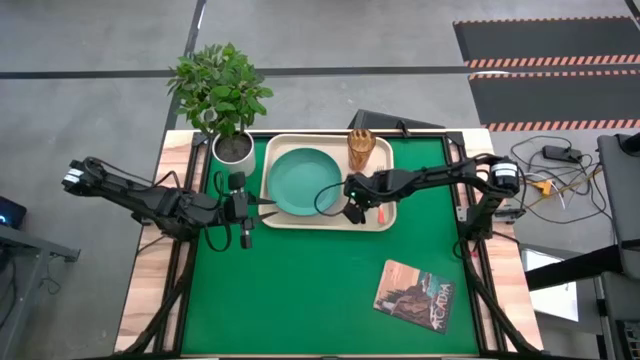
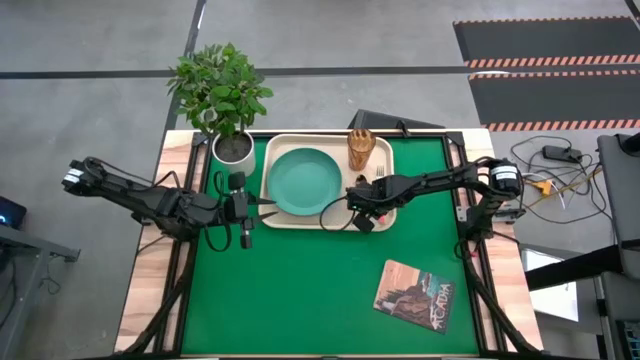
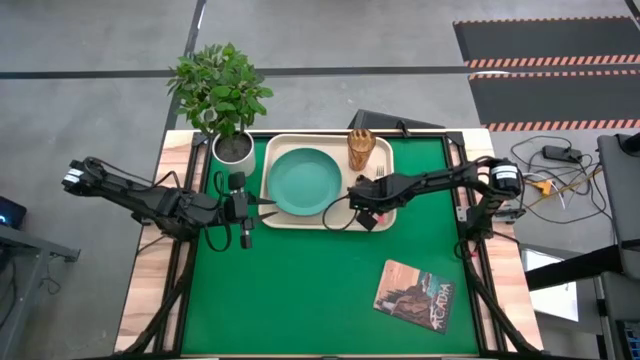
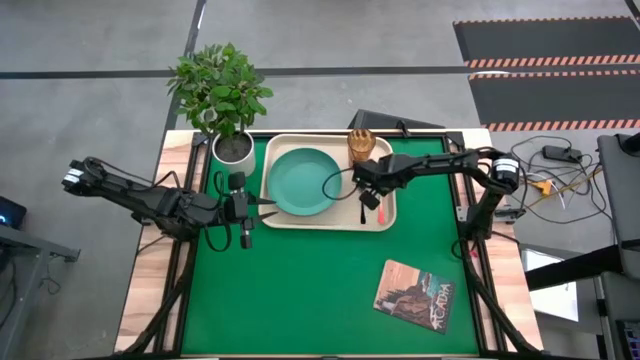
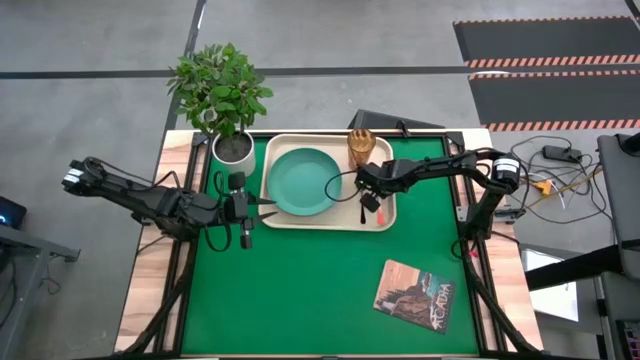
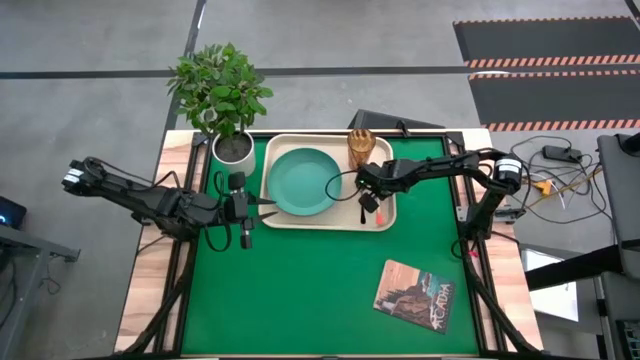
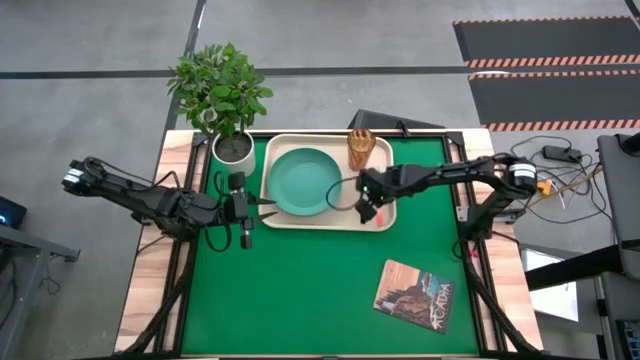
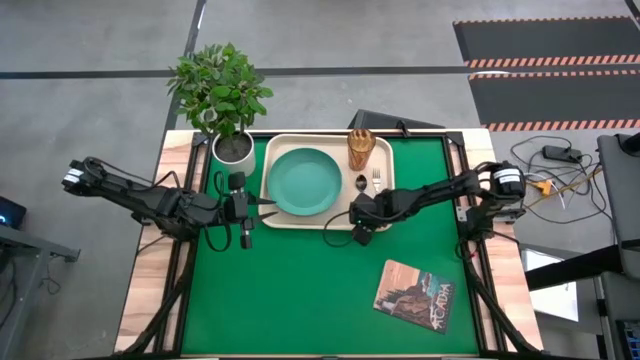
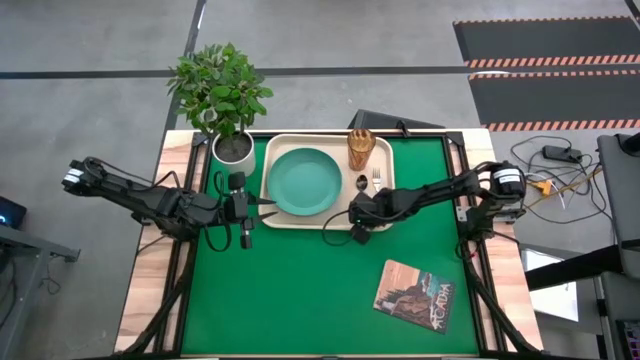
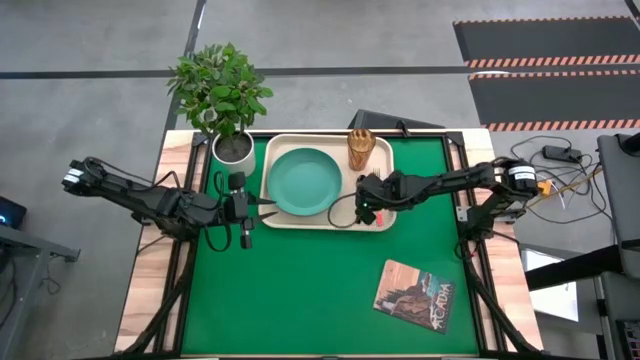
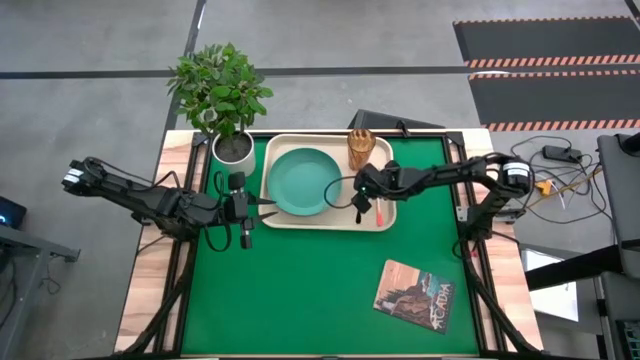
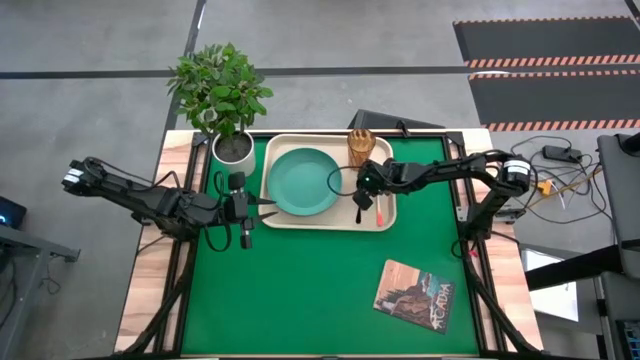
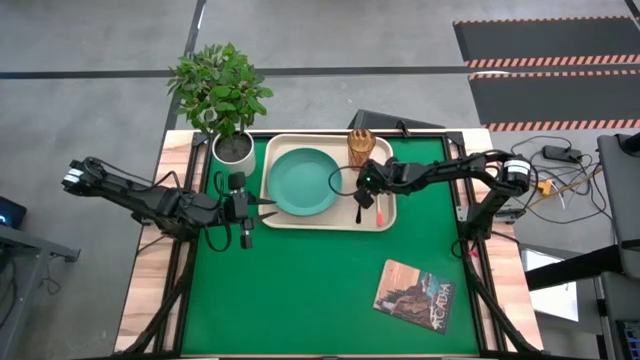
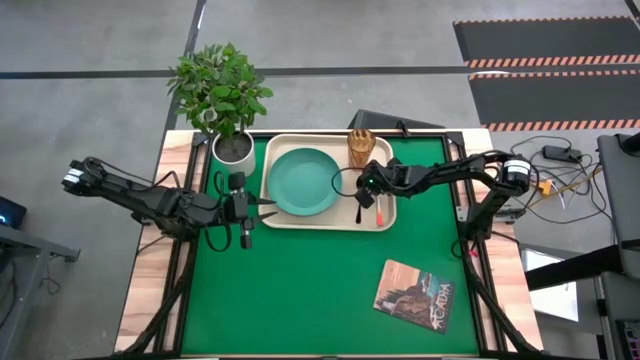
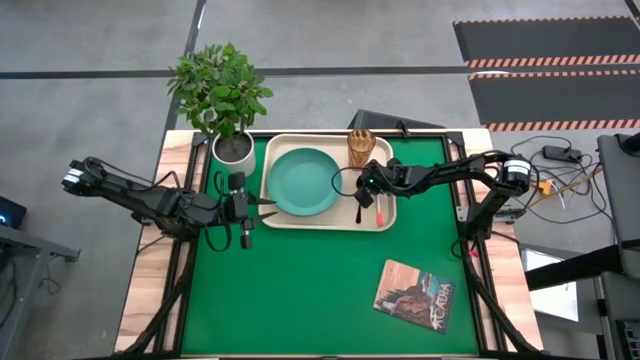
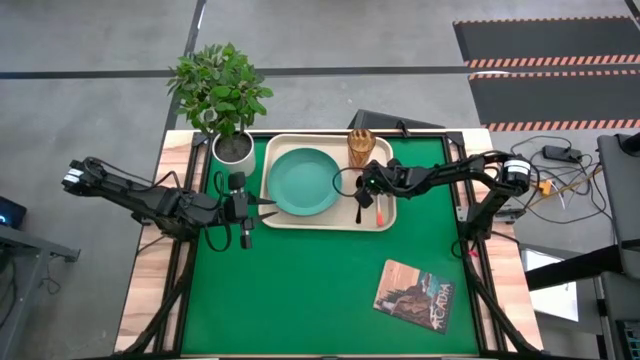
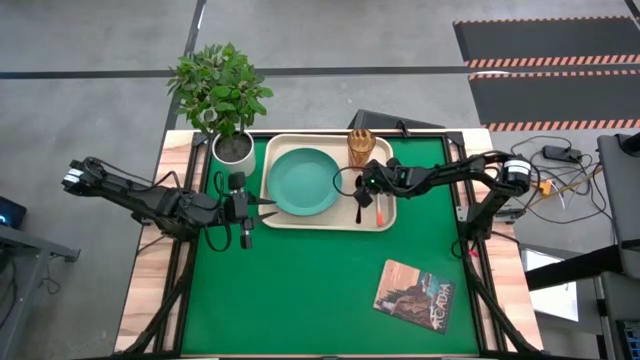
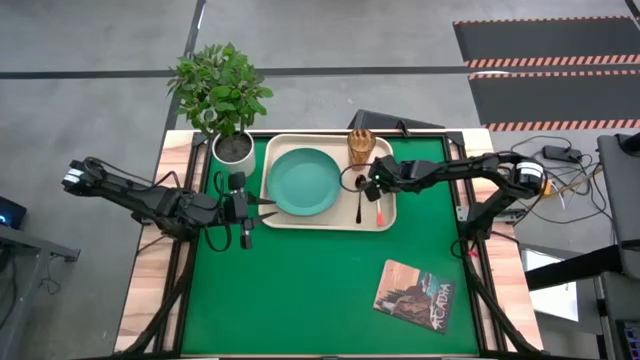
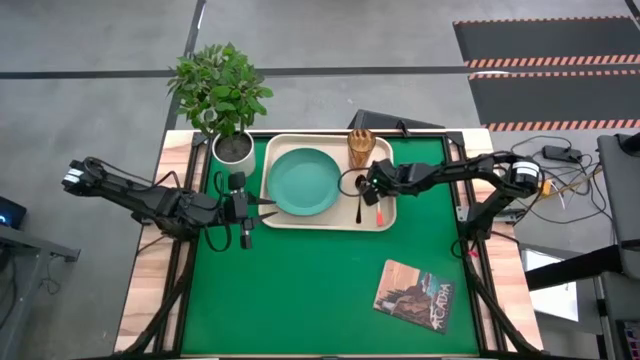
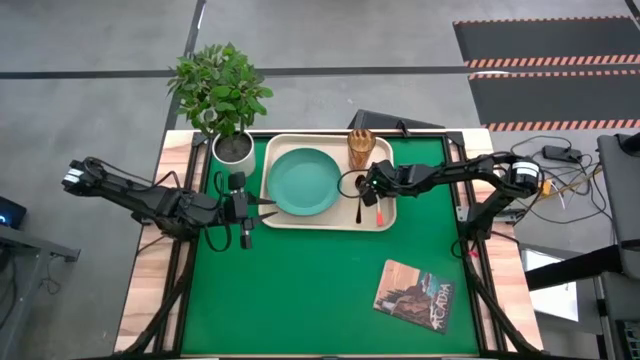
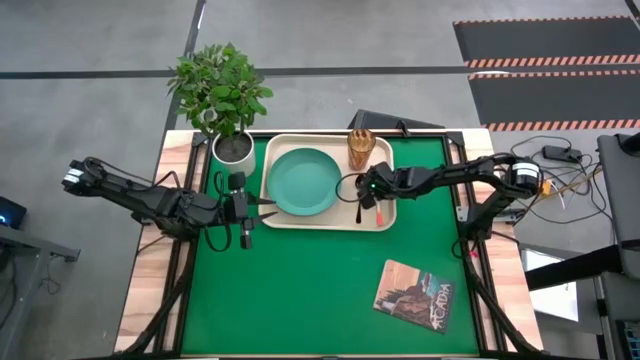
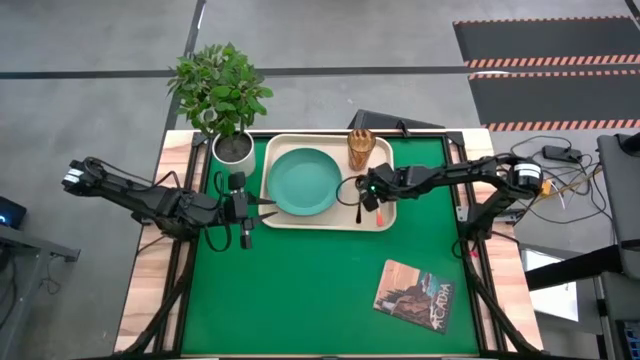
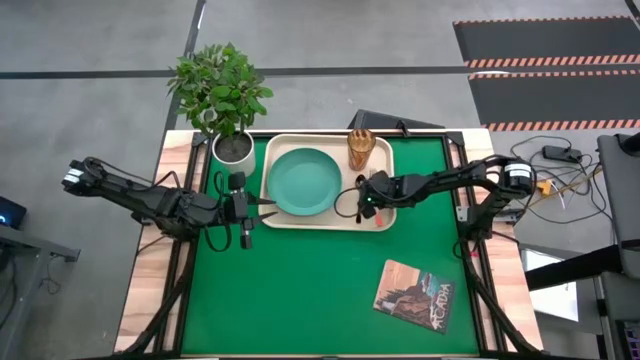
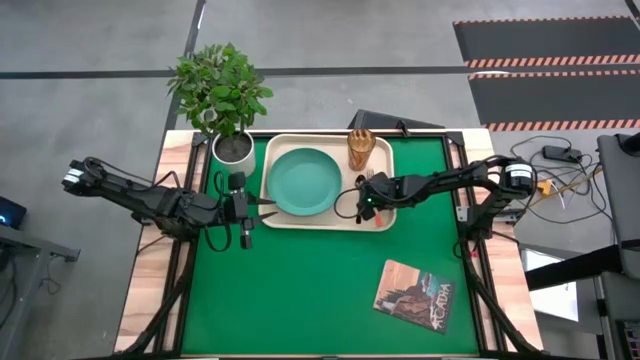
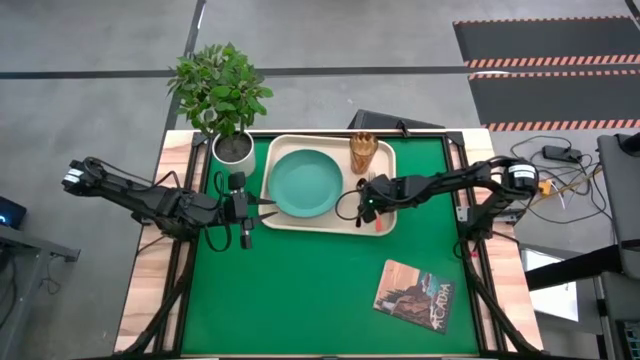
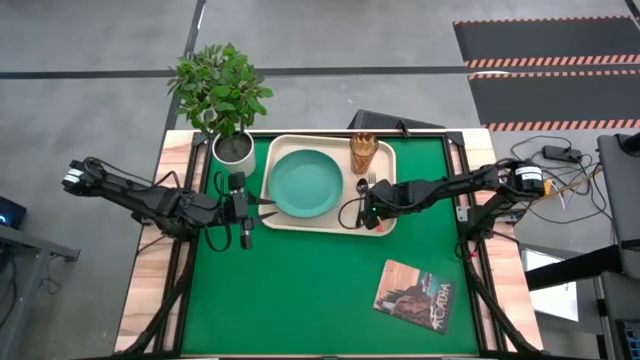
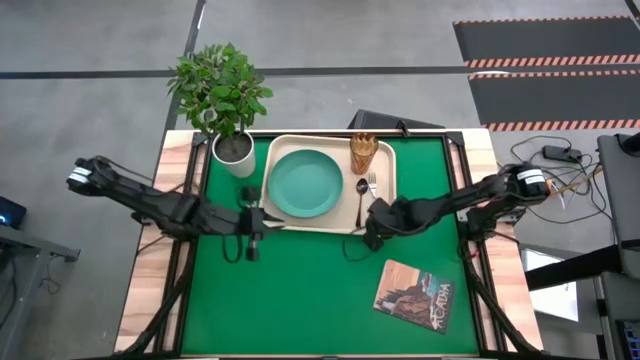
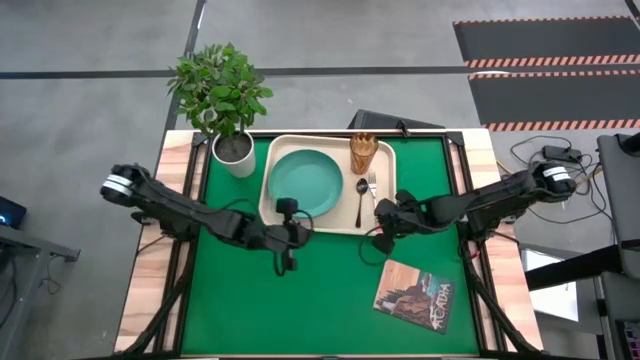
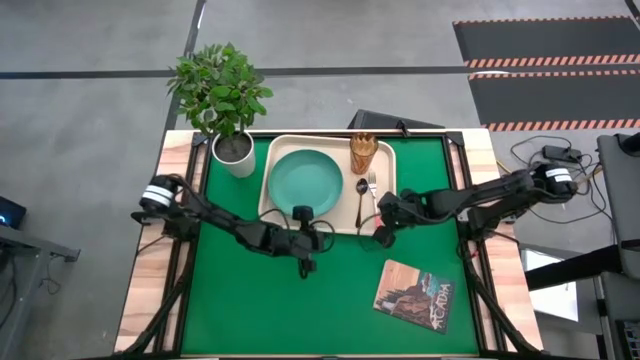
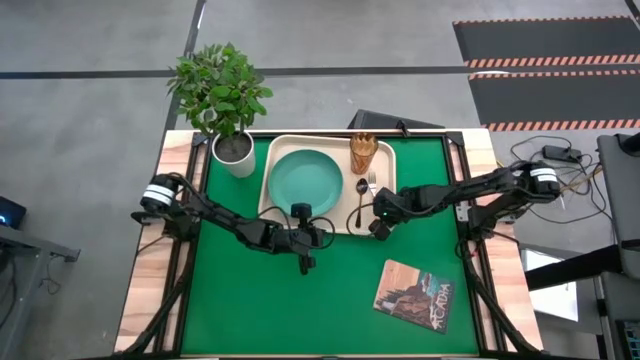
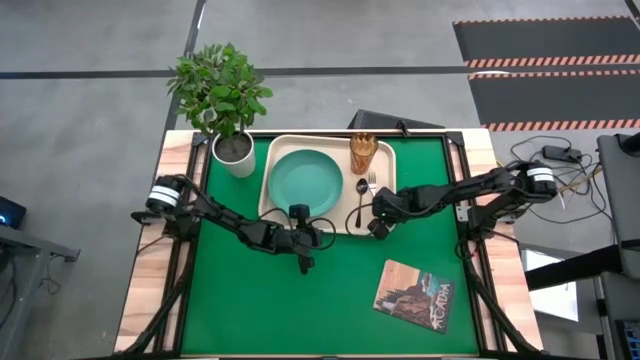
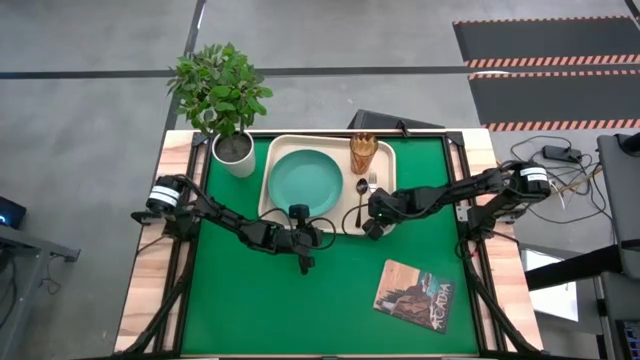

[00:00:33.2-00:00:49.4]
Task: Pick and place plate/cup/fork/spoon on tray
Adjust the spoon and the fork on the white tray

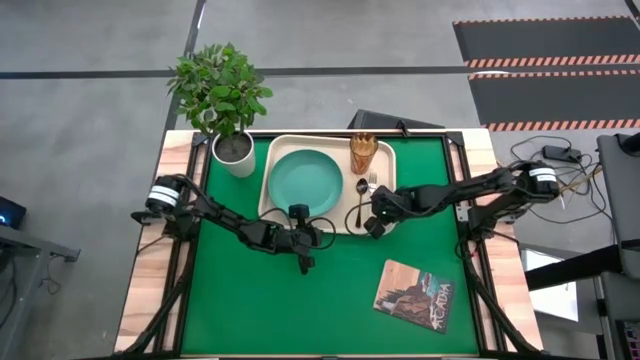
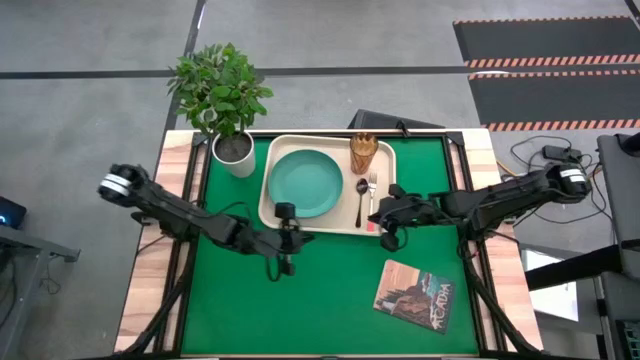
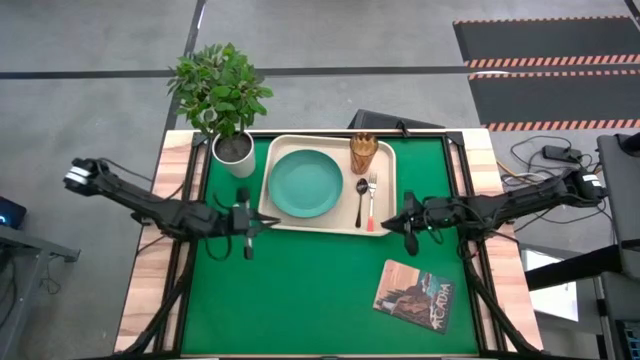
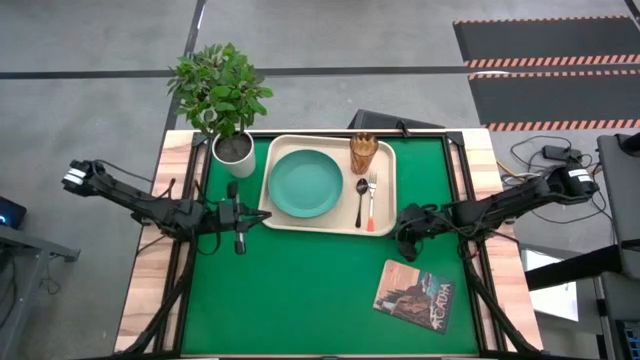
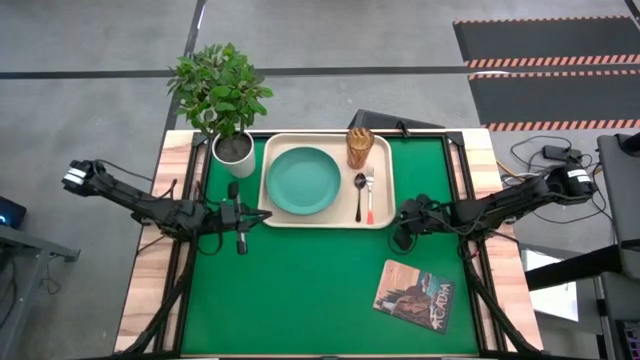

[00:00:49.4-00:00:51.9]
Adjust the white tray

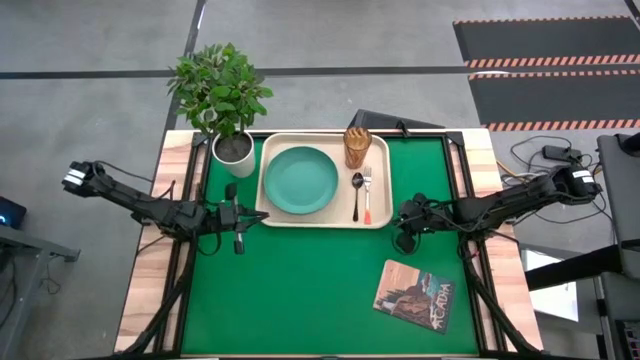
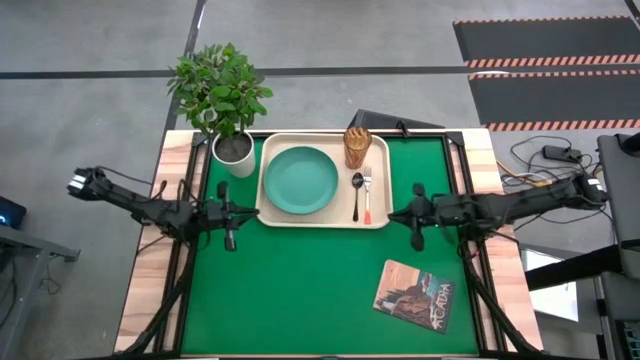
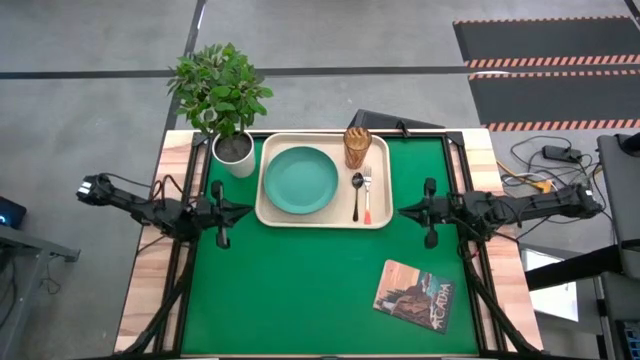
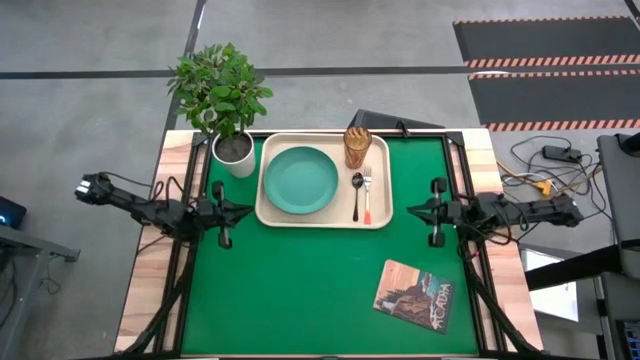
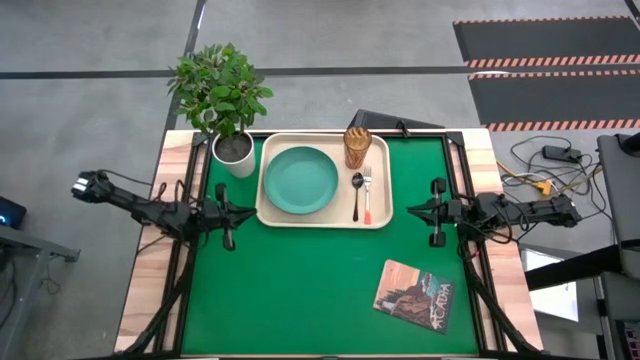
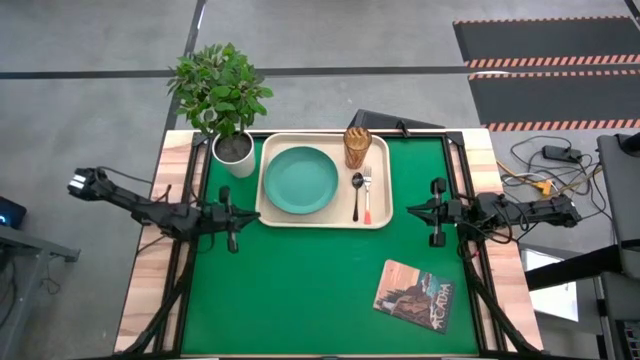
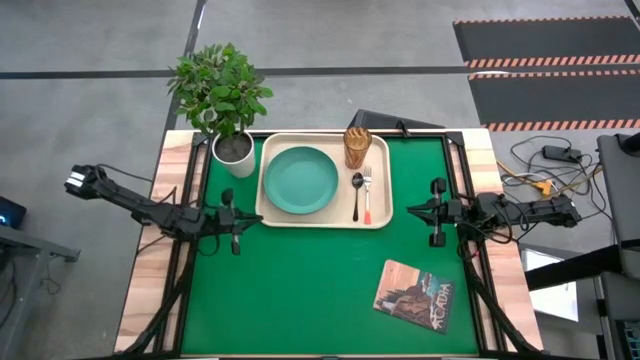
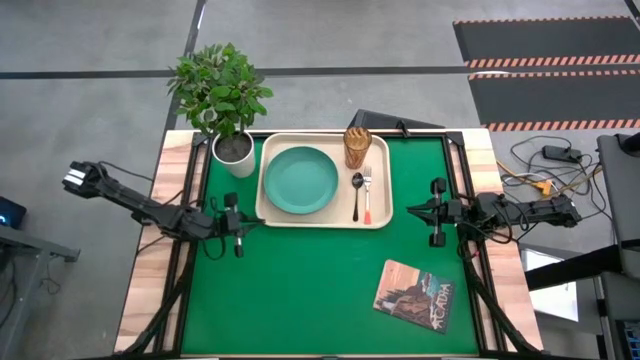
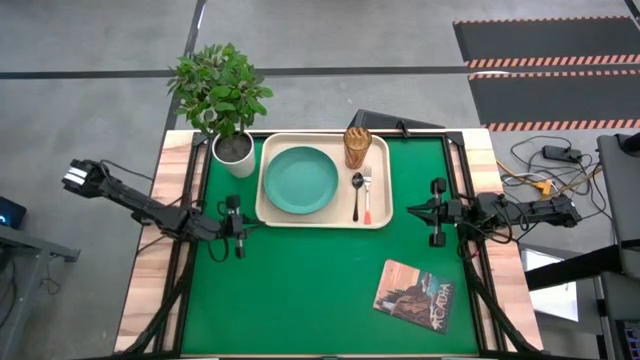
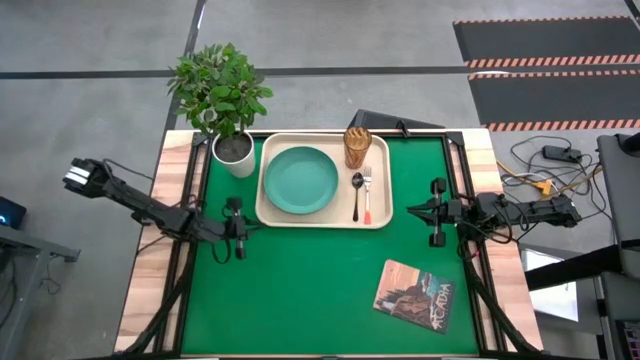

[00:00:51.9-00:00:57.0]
Return to Home Position
